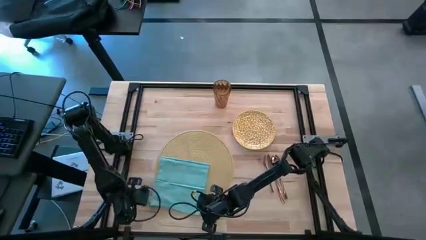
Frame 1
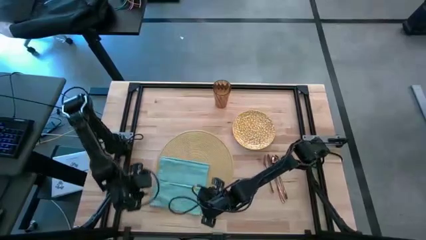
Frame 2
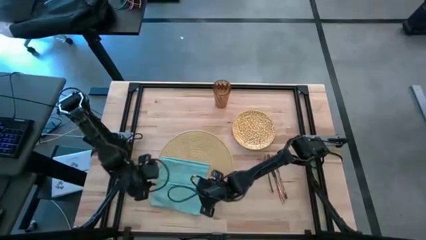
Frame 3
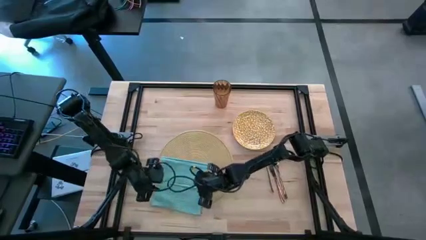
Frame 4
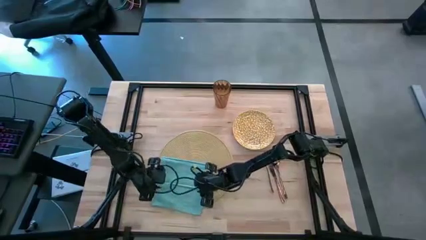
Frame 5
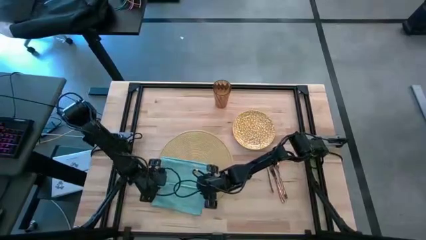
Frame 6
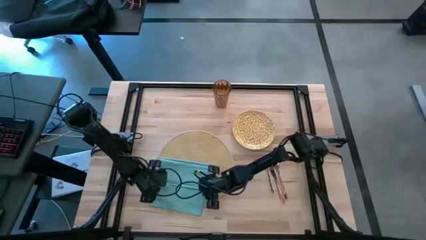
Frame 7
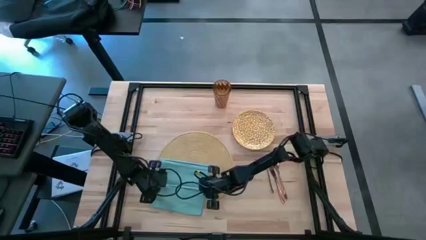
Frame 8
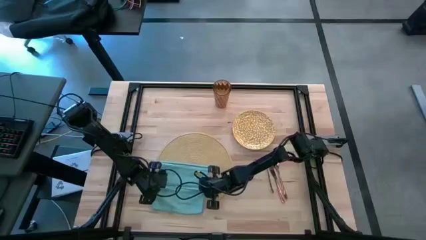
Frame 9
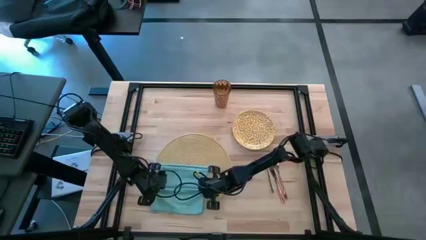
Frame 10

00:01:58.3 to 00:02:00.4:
Task: Set table place
Fold the blue table napkin

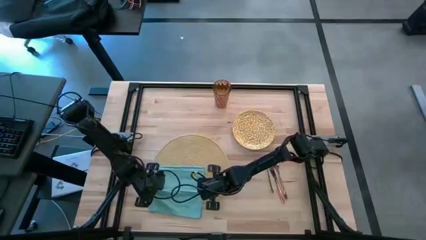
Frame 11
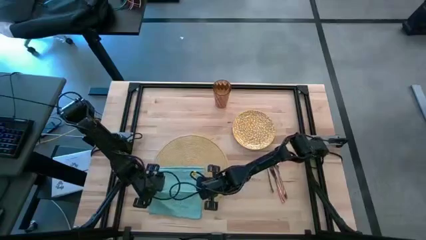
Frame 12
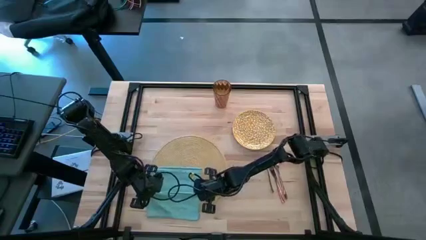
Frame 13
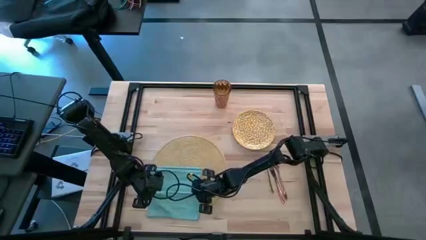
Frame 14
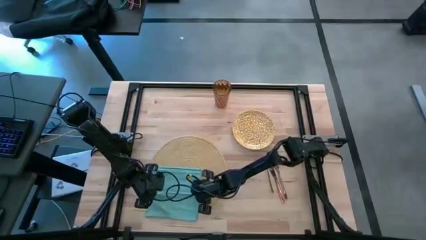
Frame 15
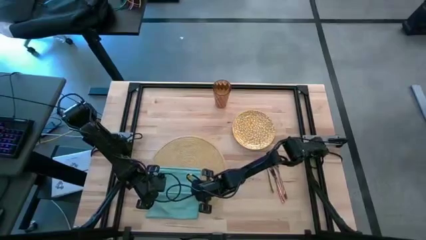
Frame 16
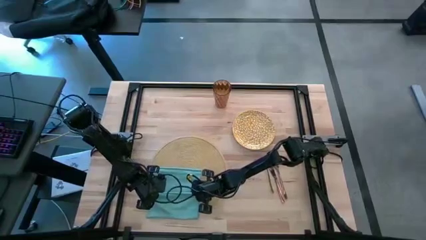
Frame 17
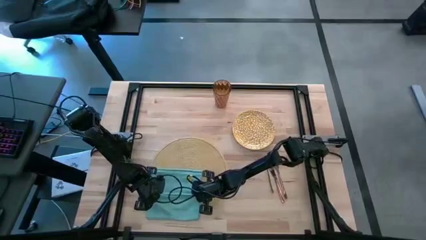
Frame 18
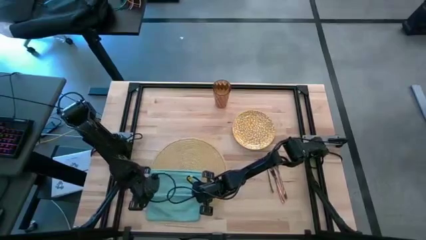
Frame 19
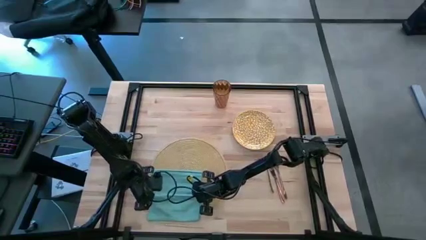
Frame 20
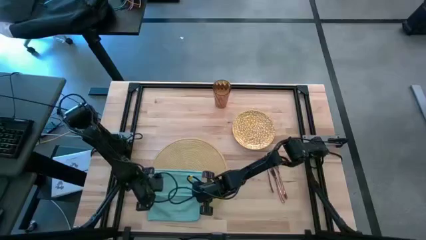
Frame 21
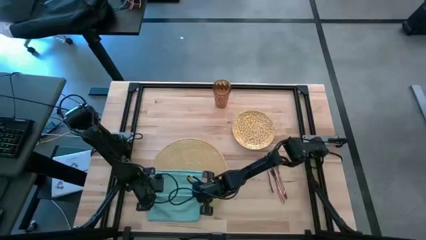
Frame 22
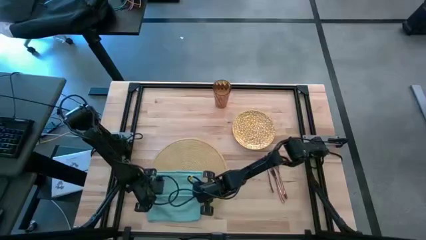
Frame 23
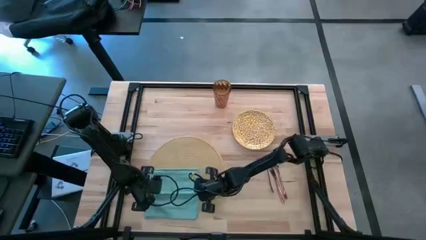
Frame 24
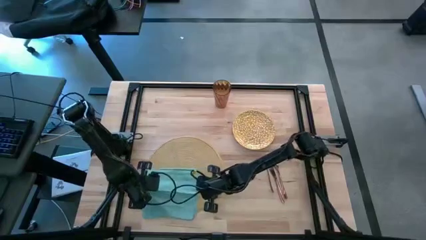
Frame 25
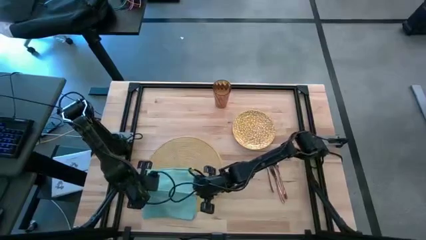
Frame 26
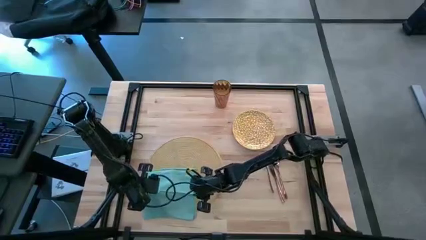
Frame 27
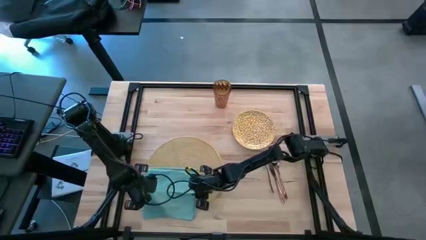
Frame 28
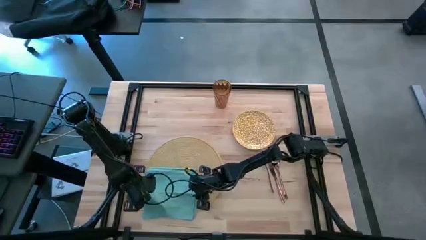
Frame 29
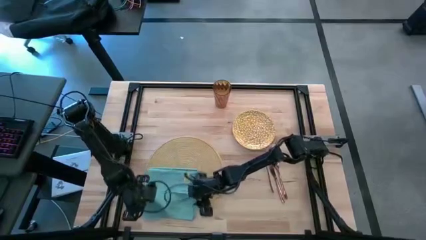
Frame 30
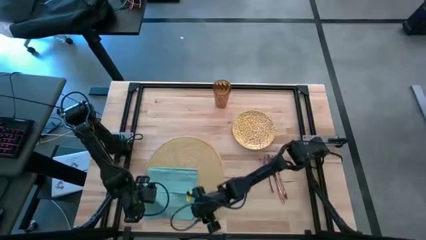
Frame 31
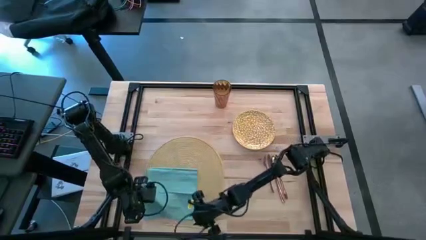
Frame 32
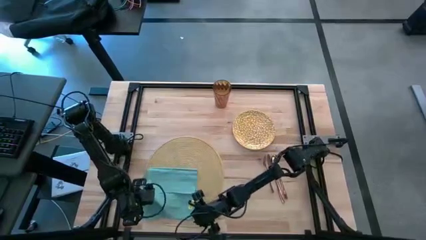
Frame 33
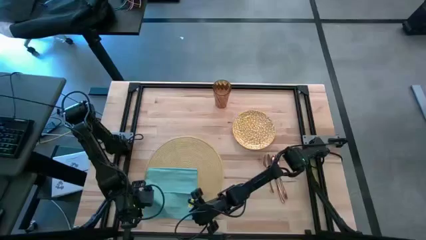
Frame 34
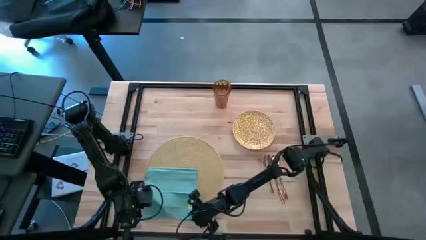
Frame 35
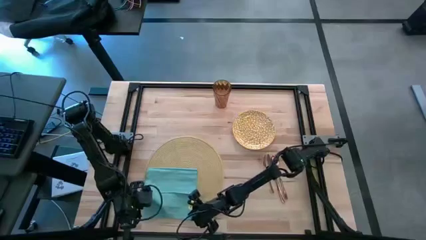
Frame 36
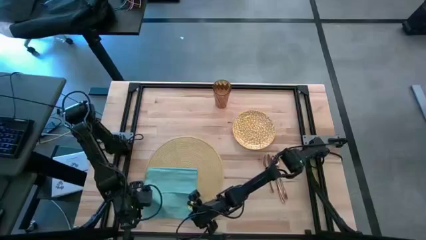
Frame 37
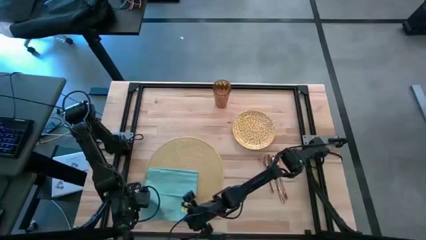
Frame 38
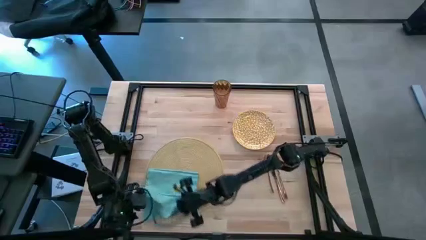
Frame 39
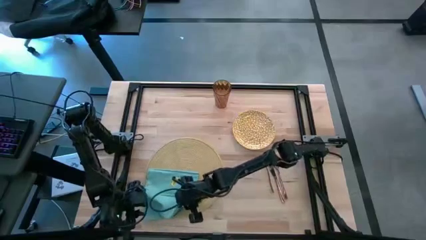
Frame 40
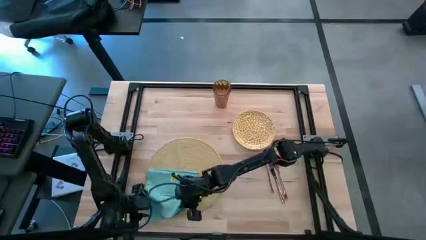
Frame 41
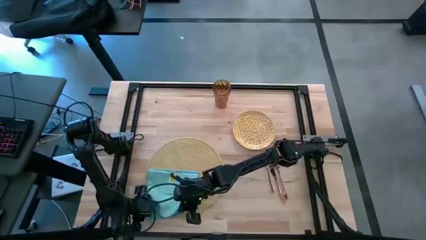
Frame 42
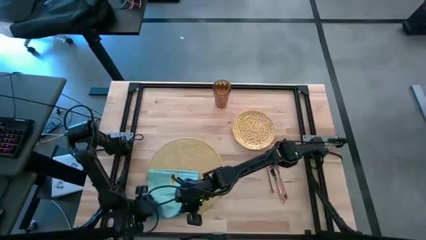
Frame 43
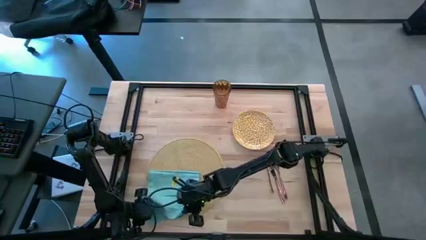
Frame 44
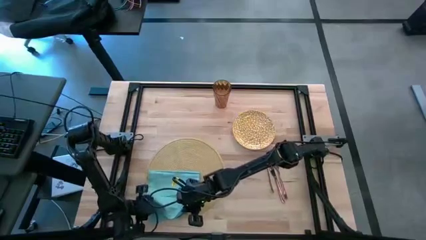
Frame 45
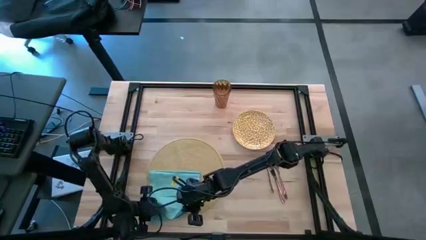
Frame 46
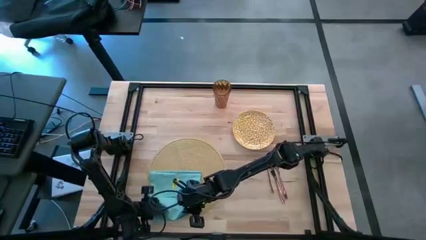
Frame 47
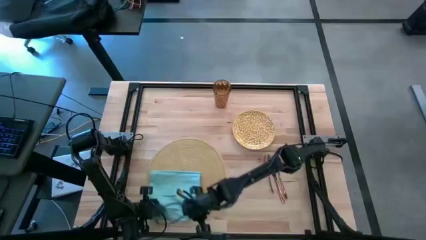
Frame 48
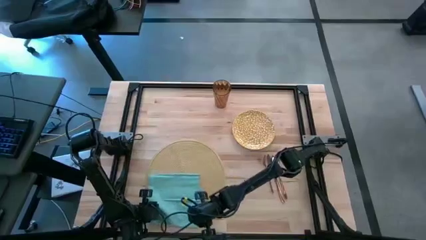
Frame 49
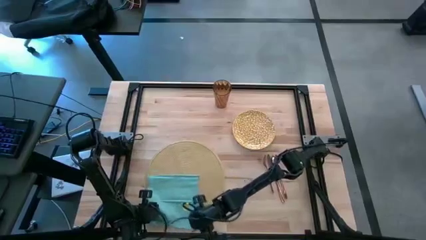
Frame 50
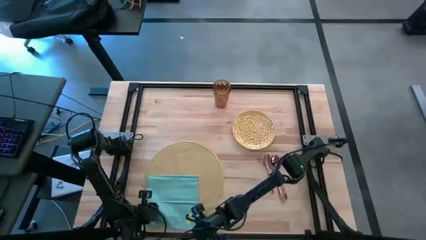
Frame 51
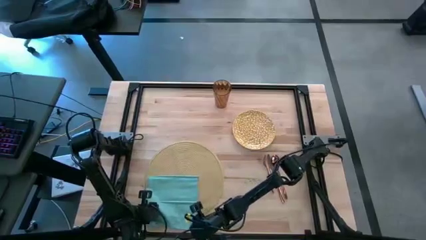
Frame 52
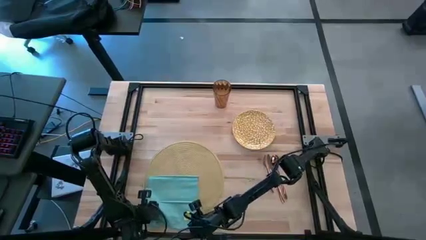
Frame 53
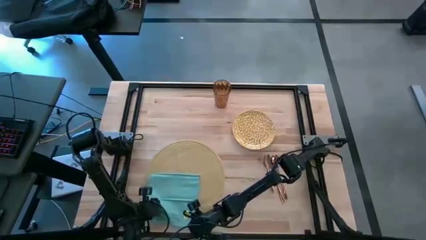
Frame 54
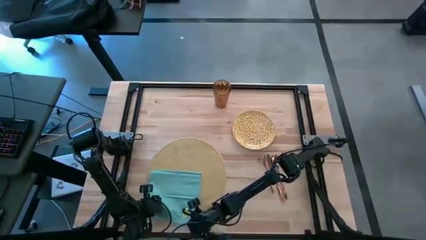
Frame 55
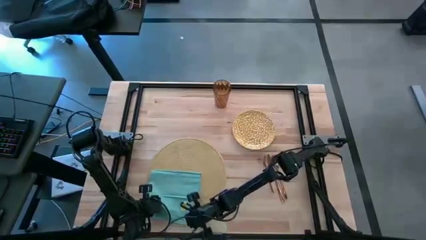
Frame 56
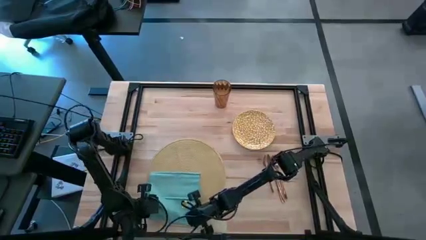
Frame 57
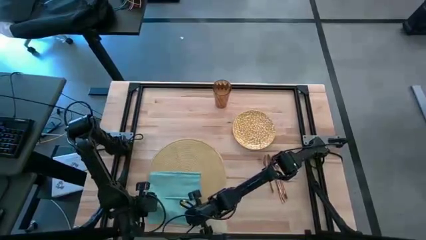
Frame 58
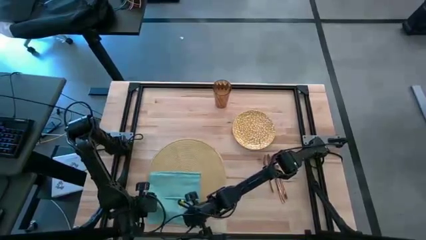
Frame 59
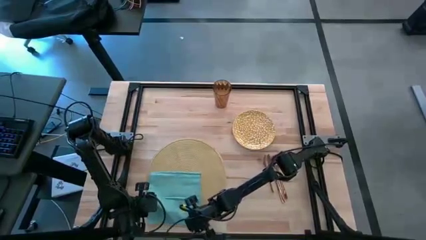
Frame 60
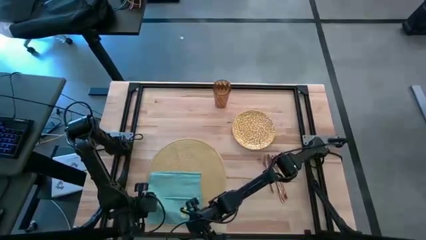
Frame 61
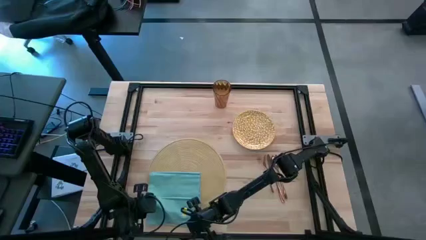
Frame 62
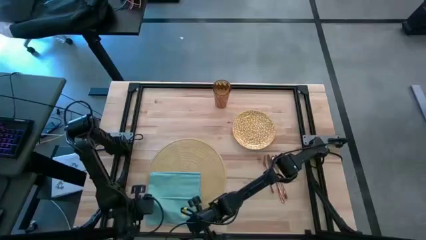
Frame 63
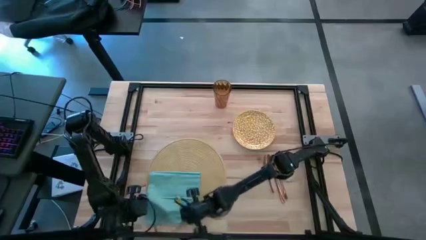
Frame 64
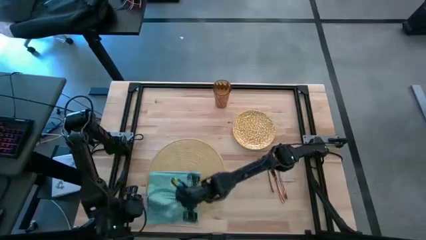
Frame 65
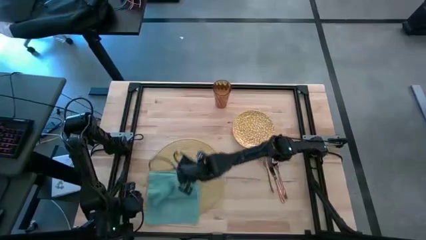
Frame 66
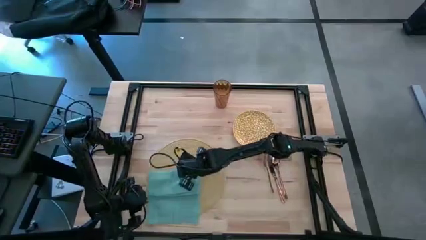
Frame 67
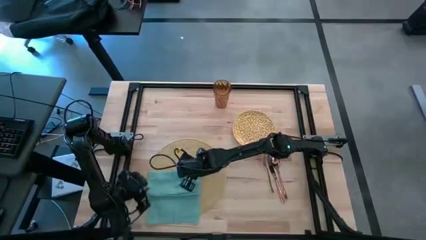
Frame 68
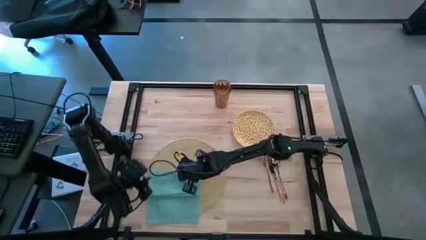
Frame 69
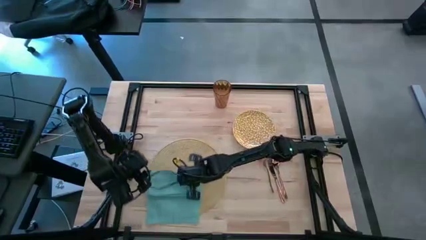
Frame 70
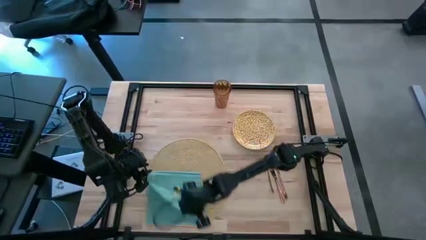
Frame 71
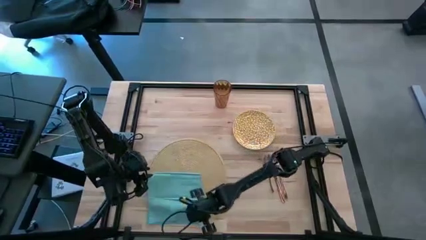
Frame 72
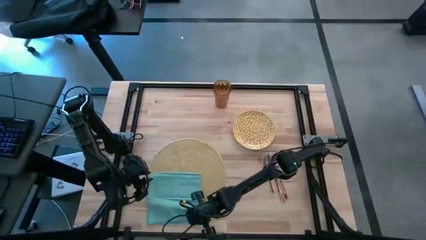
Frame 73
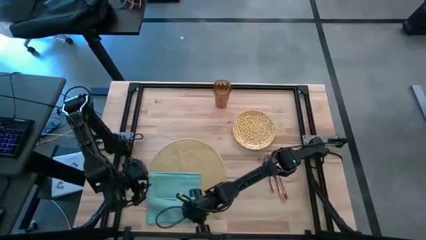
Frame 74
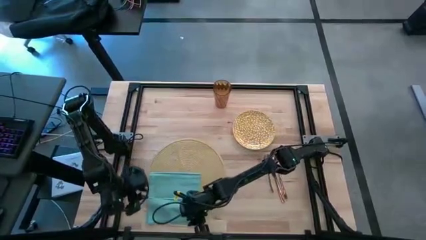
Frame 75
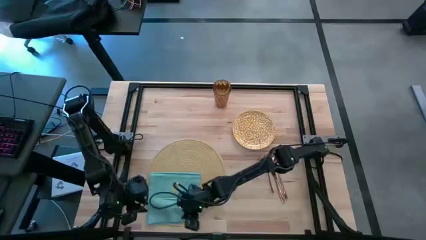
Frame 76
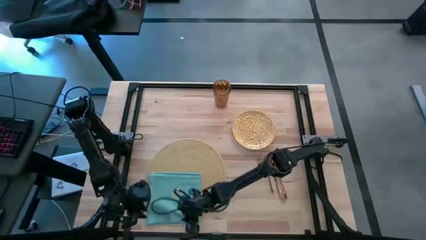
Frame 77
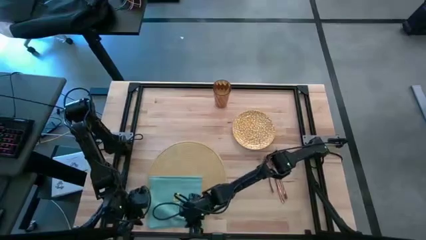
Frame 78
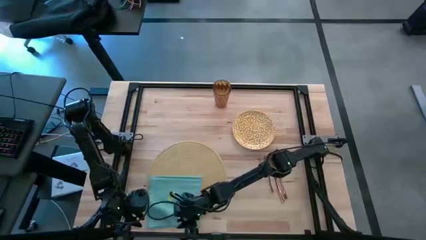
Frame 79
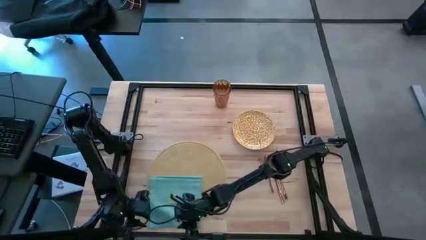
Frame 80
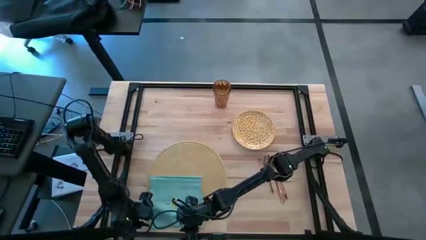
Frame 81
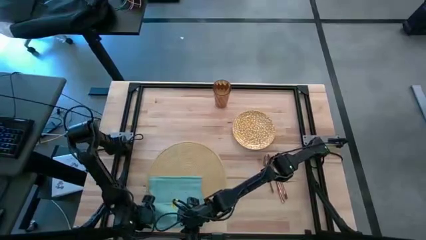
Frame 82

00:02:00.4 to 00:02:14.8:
Fold the blue table napkin
